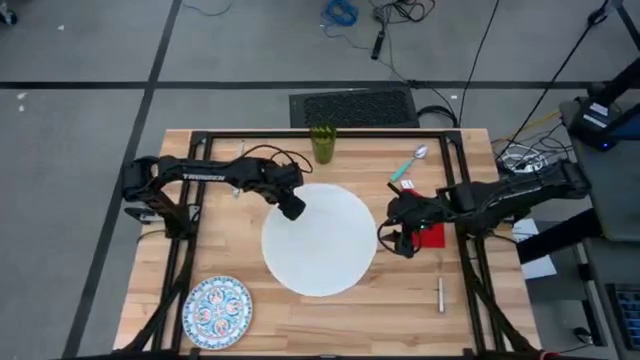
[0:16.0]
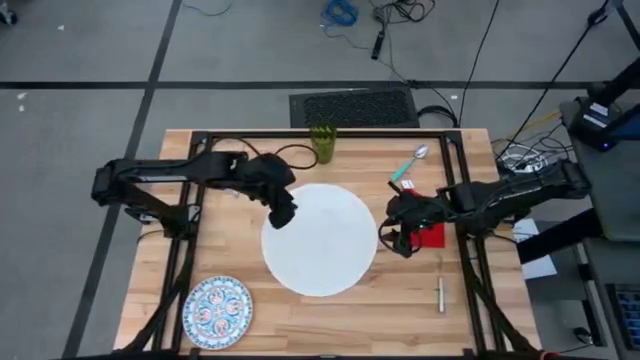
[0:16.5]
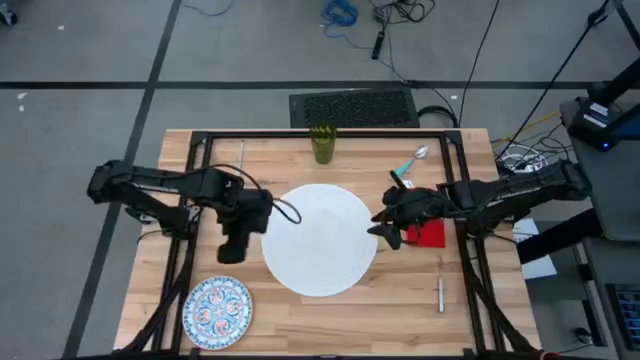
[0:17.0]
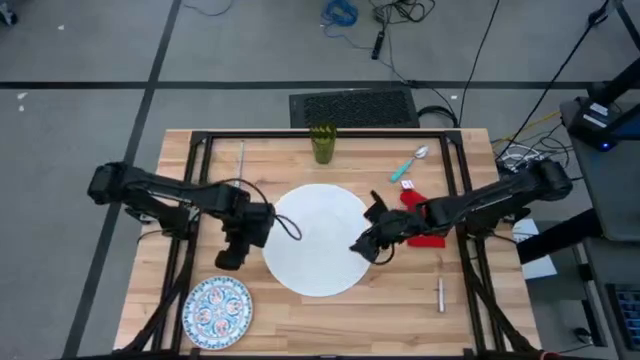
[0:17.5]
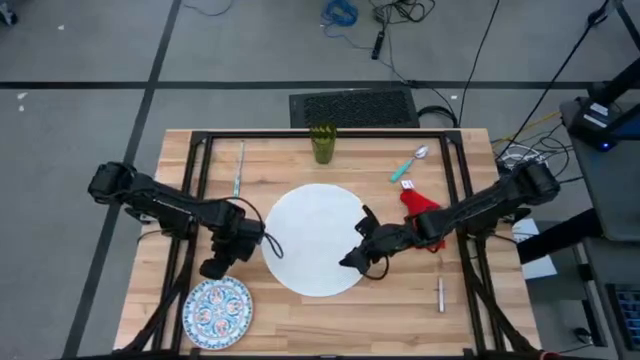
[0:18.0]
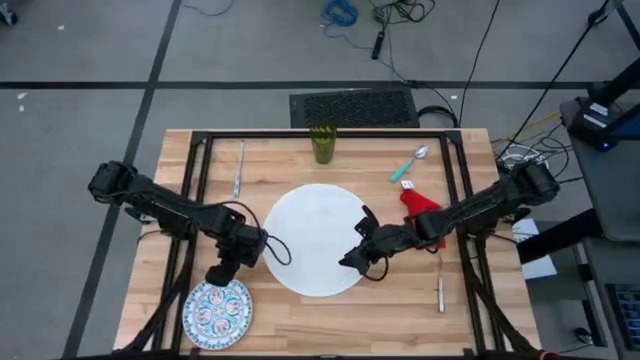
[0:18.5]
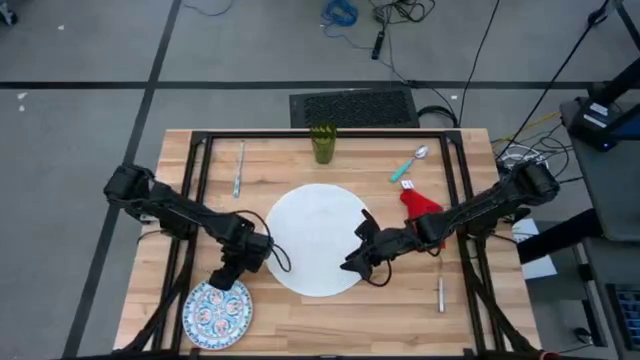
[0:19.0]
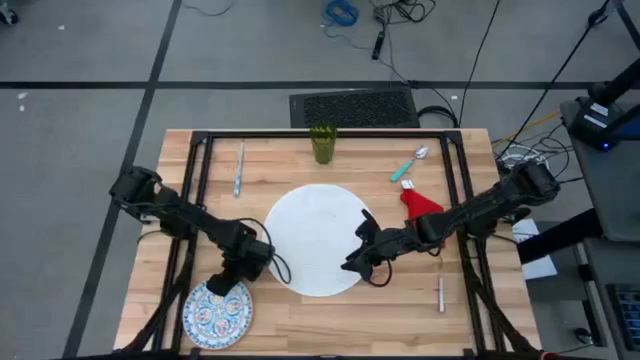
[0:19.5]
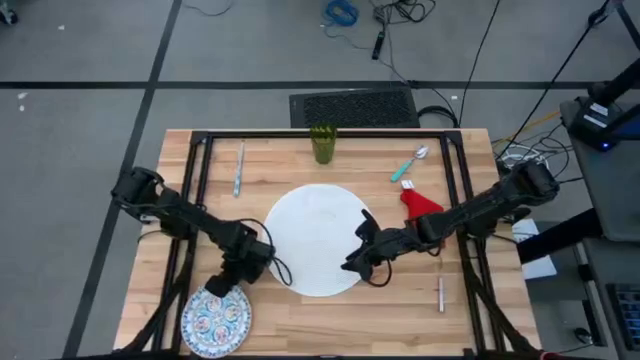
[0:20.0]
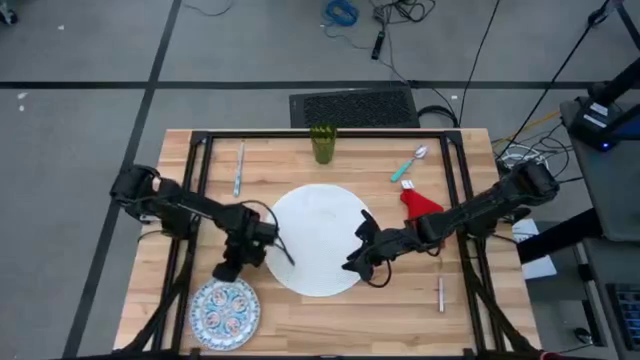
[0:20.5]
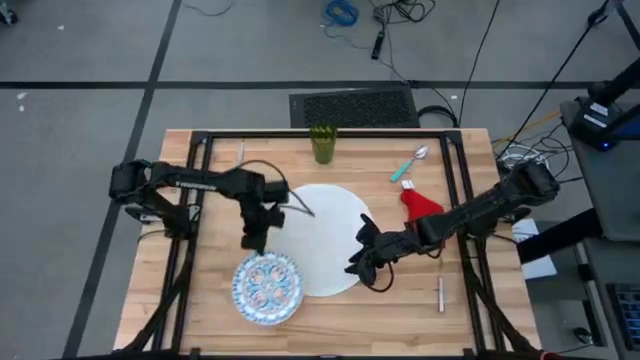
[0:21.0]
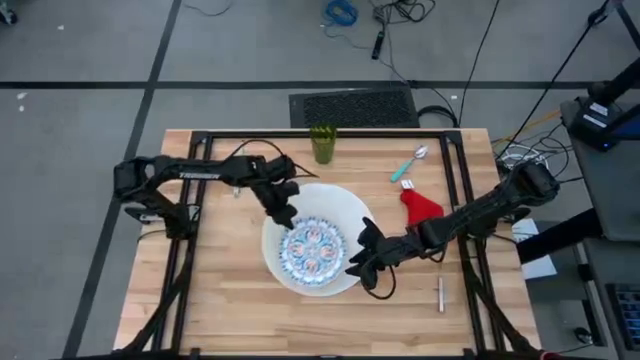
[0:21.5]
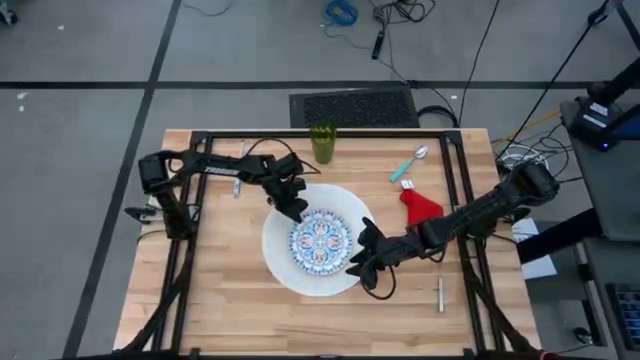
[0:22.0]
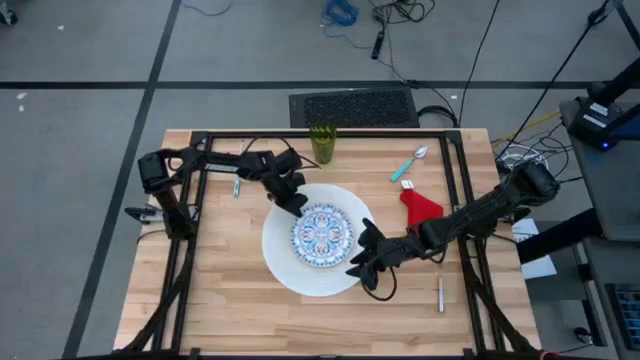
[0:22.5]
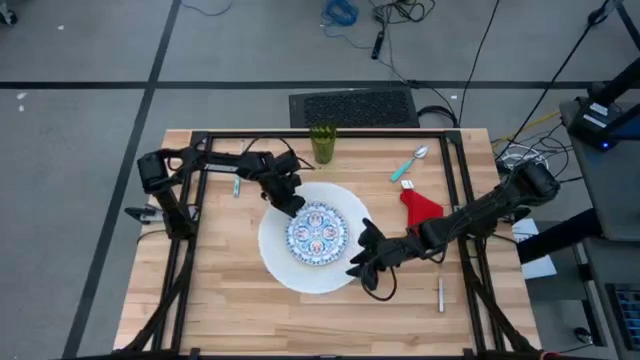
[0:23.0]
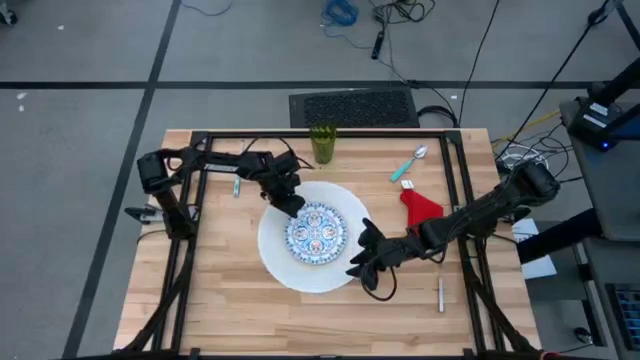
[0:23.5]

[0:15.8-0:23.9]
Task: Set table place
Put the white plate on the white table placemat

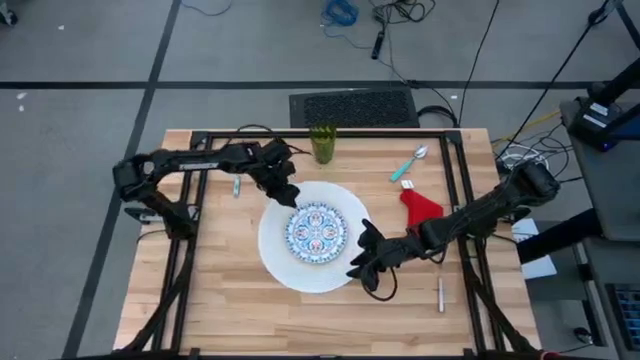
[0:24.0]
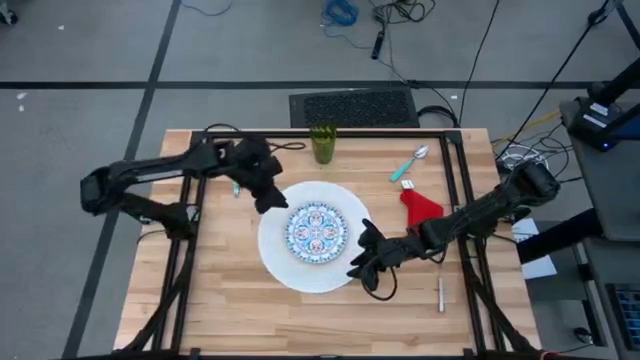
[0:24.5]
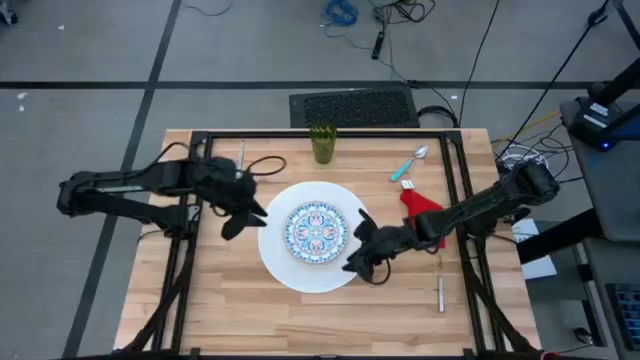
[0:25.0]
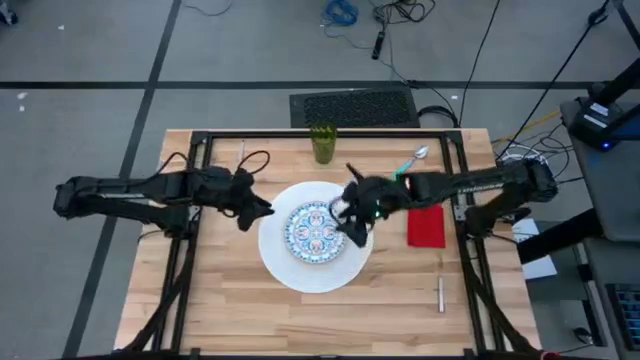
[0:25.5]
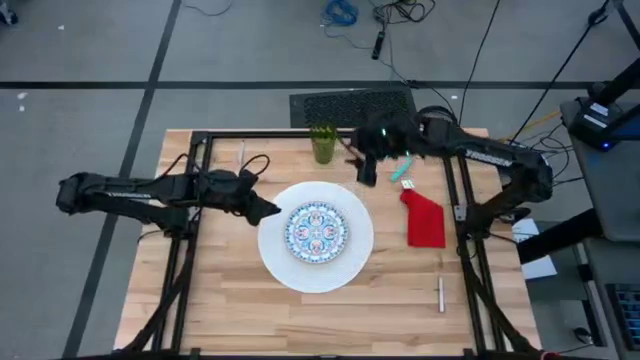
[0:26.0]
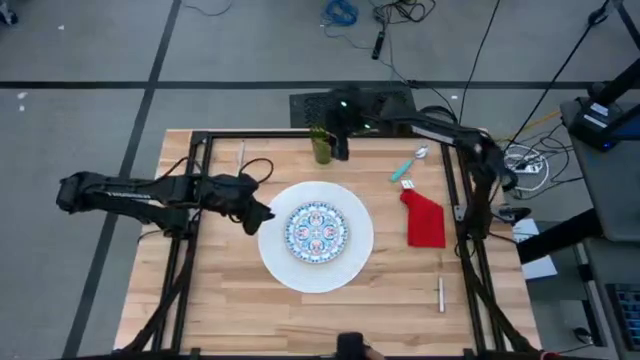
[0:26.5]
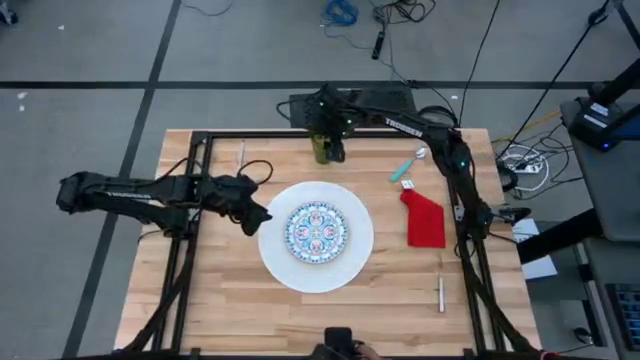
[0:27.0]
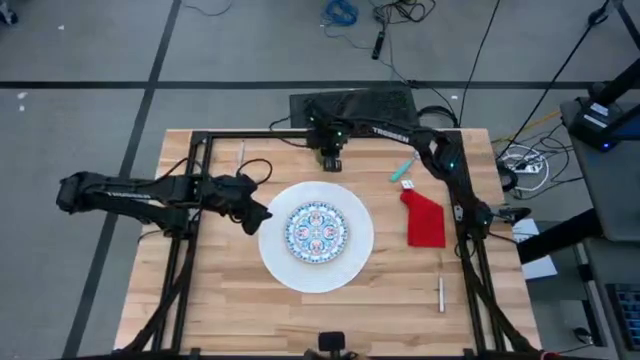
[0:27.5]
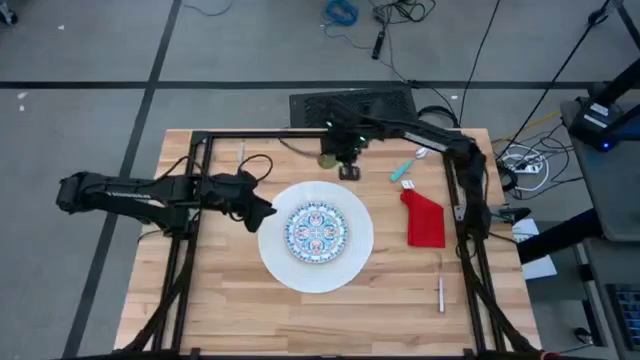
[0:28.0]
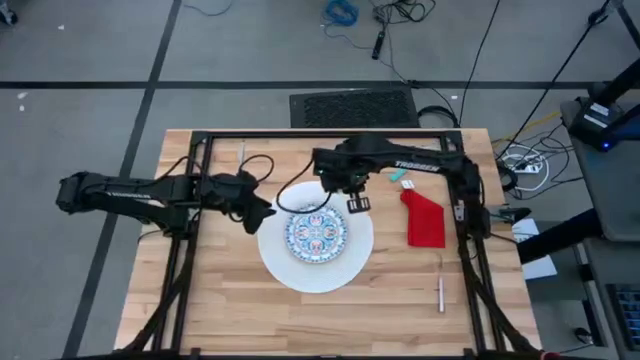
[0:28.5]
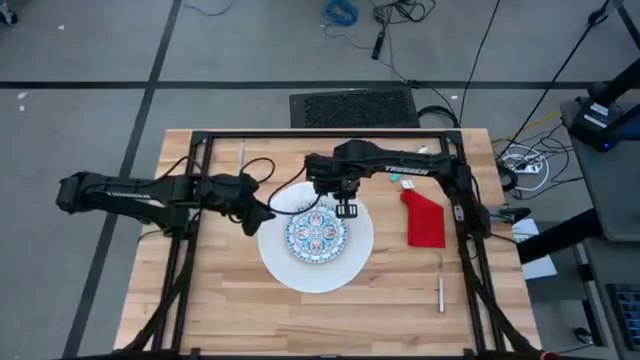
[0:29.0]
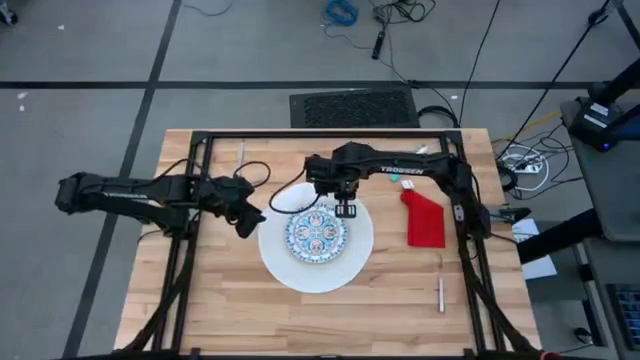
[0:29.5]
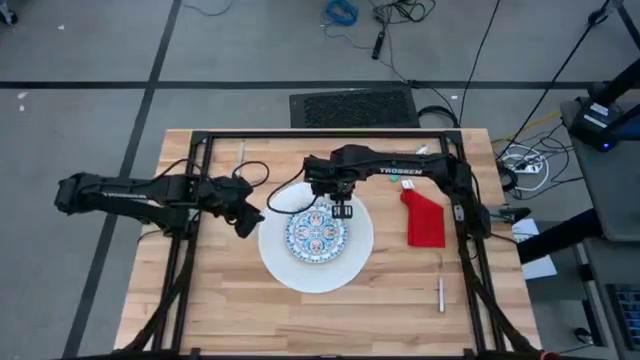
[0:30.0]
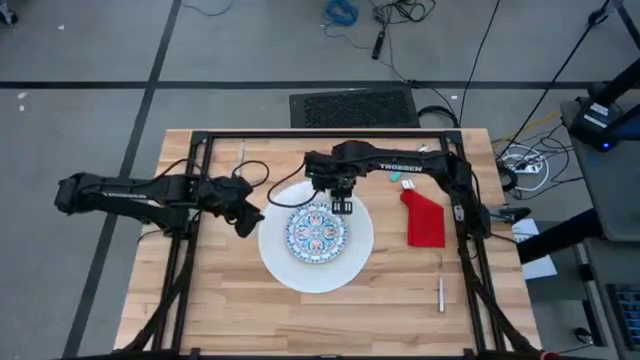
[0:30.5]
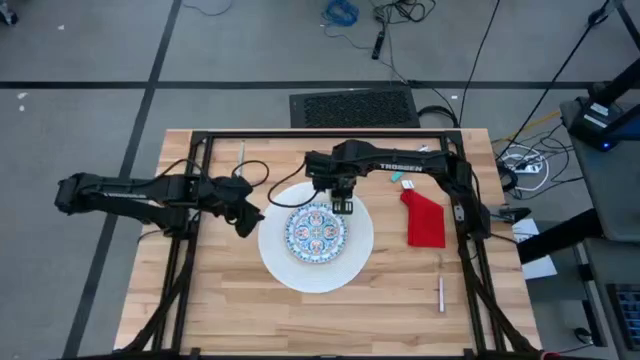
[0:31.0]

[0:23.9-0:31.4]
Put the green cup to the top right of the plate on the table placemat

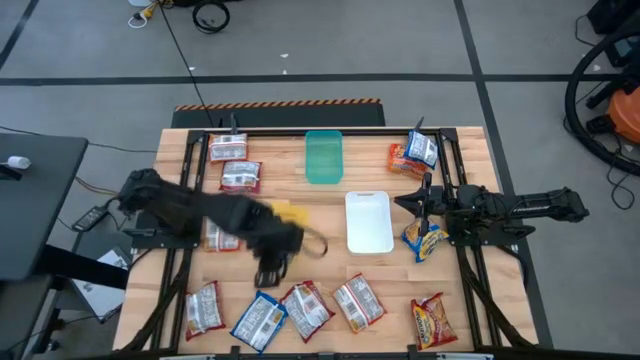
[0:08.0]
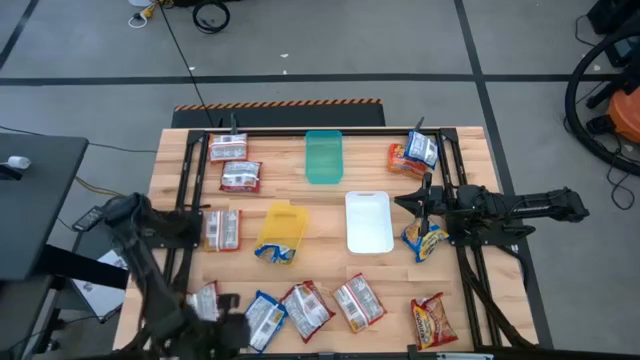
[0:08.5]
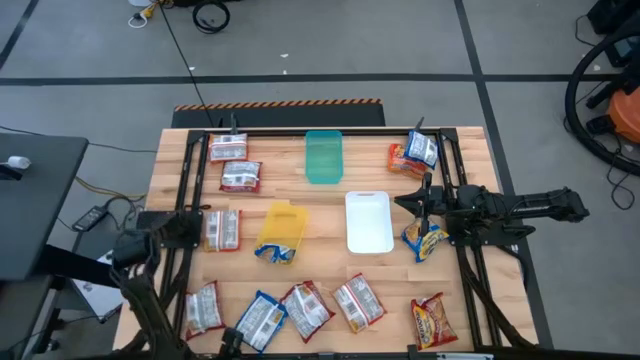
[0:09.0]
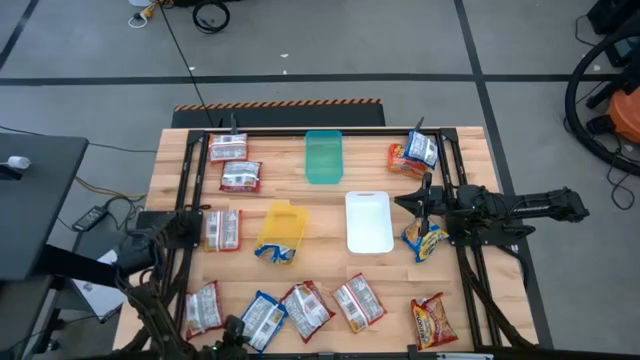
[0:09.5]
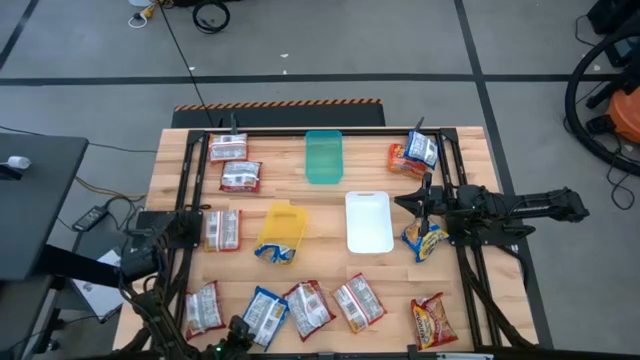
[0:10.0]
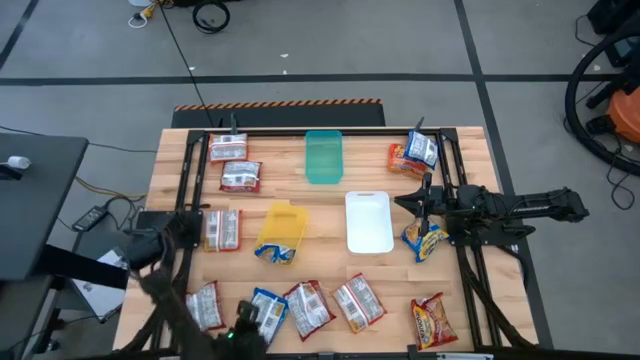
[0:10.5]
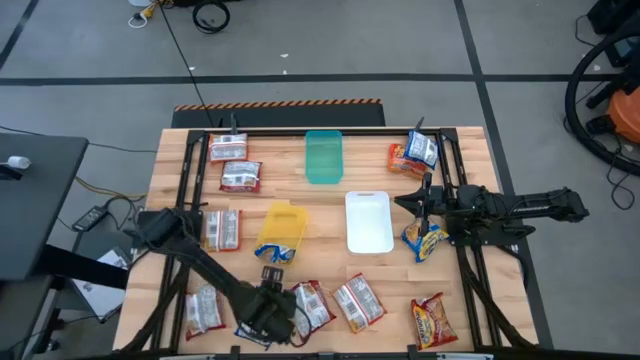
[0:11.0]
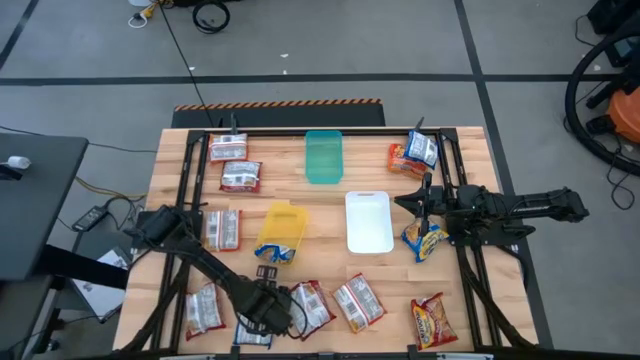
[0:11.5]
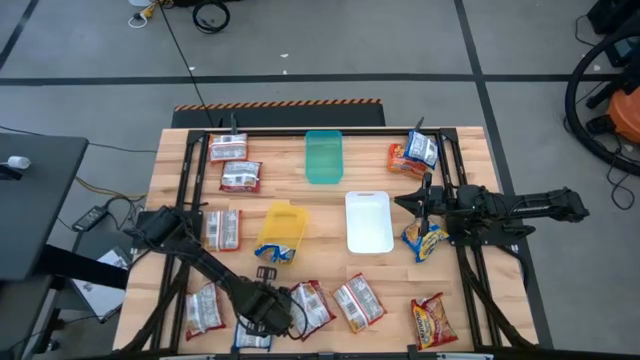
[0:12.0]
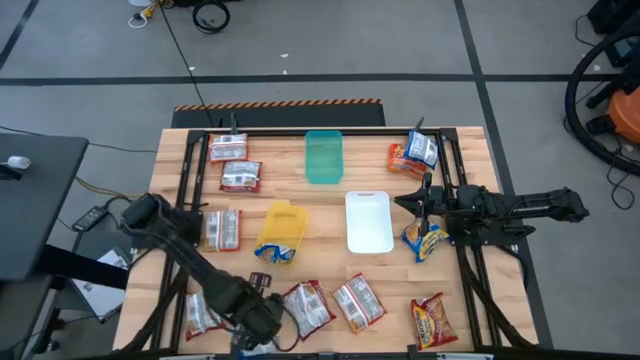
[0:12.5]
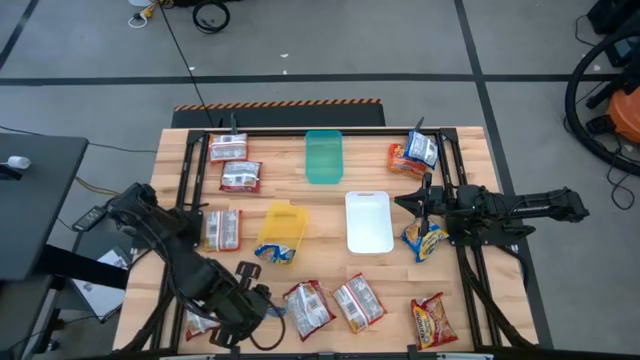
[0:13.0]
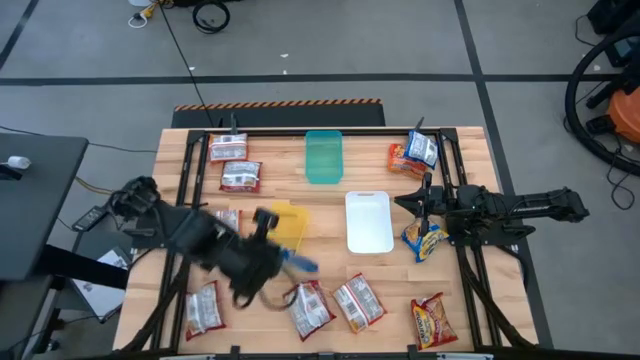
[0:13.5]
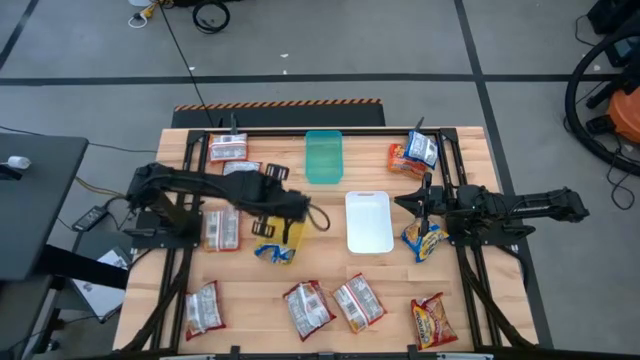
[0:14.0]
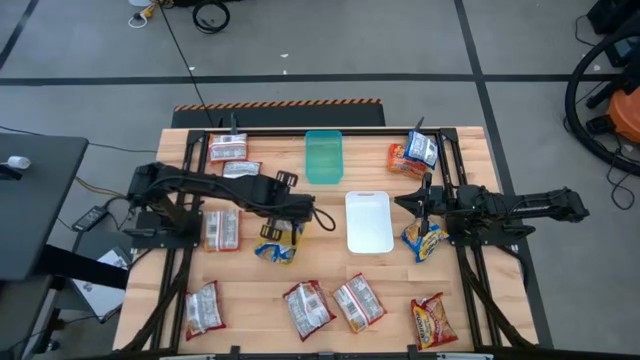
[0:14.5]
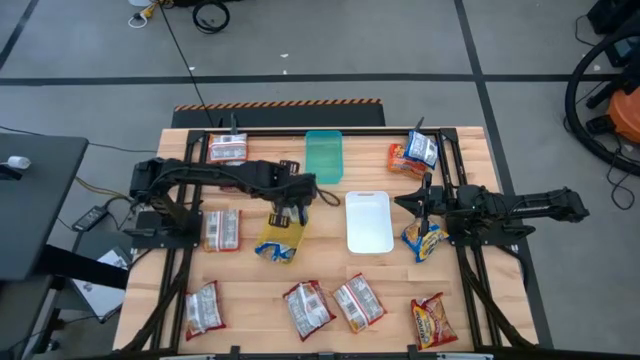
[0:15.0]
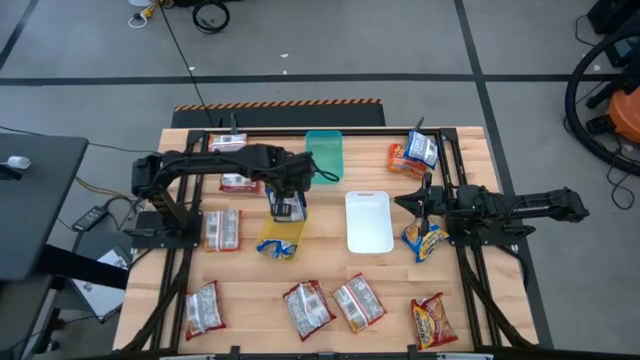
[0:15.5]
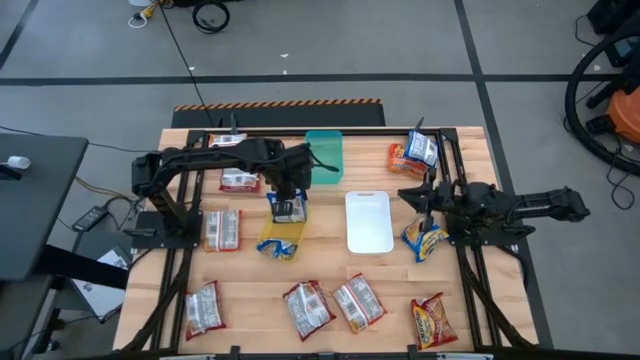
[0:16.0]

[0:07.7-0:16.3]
Task: Sort Maruchan noodles
Put the bottom left blue noodle pack into the yellow bin
